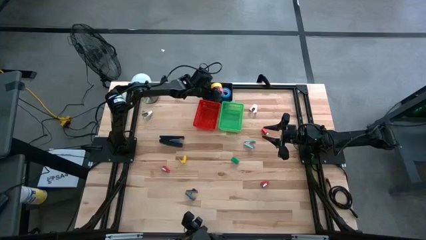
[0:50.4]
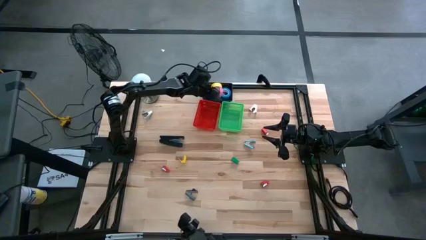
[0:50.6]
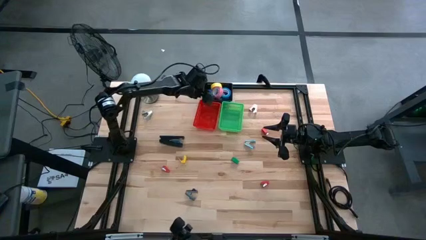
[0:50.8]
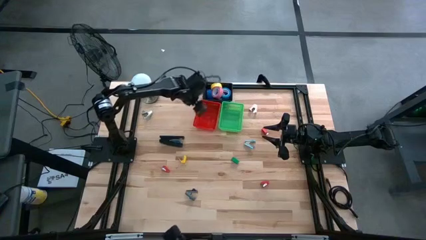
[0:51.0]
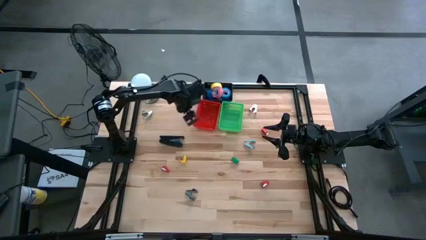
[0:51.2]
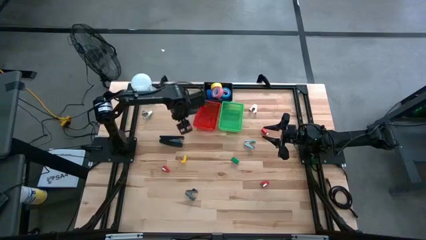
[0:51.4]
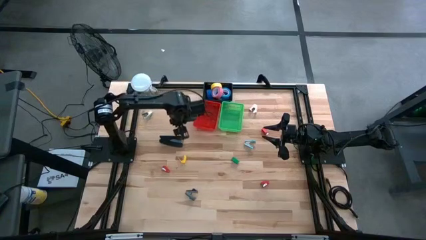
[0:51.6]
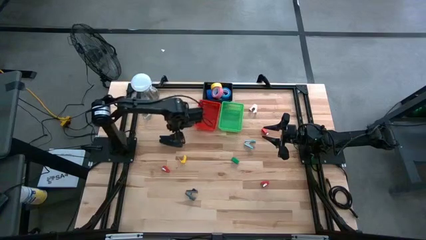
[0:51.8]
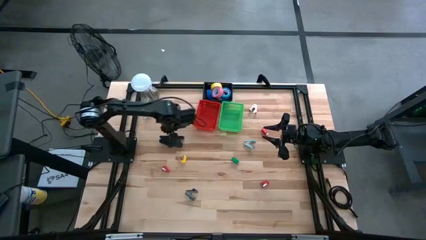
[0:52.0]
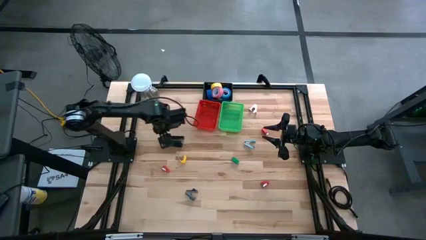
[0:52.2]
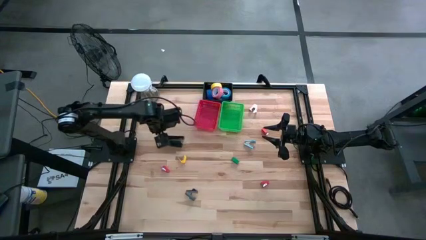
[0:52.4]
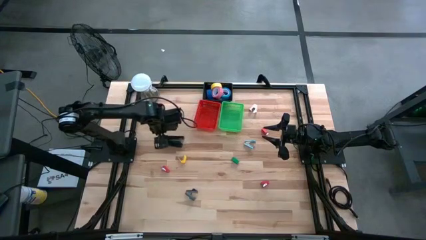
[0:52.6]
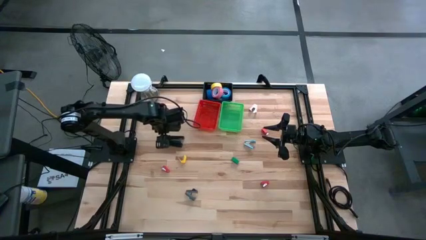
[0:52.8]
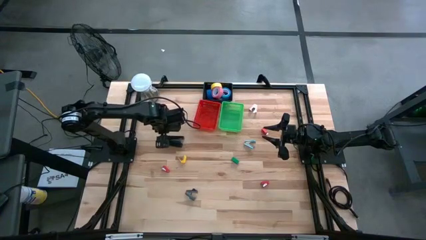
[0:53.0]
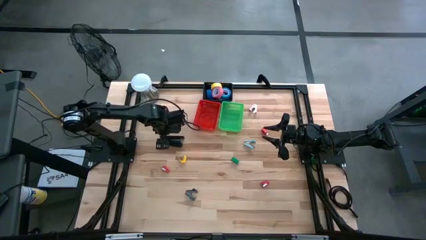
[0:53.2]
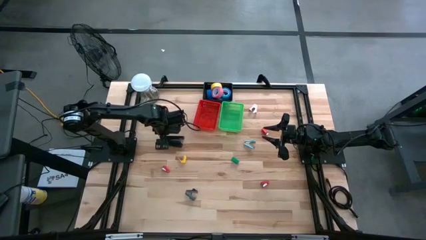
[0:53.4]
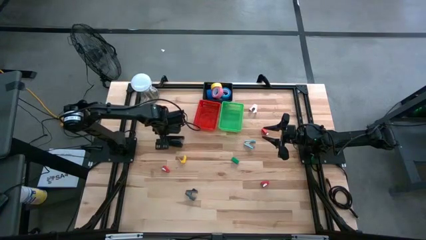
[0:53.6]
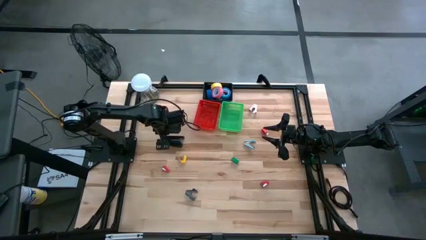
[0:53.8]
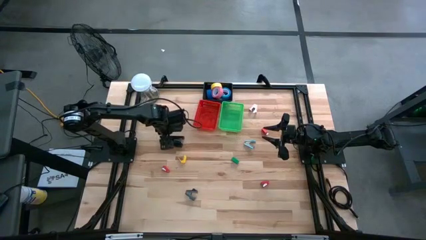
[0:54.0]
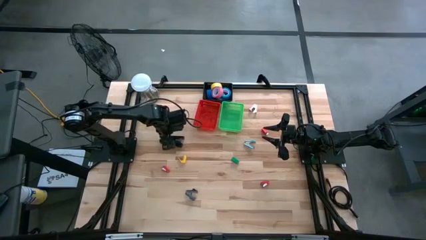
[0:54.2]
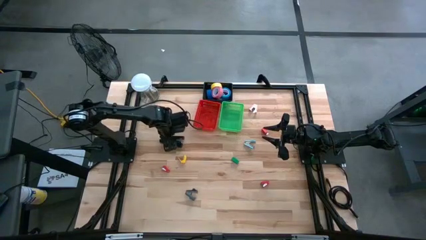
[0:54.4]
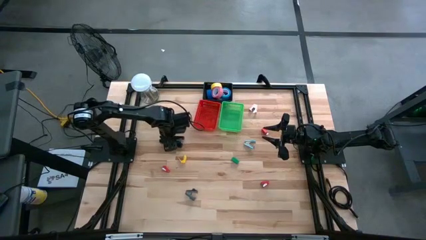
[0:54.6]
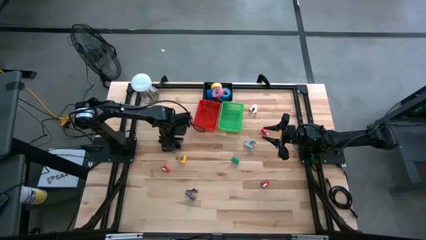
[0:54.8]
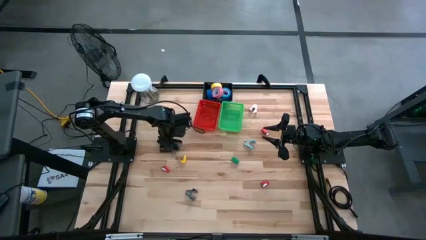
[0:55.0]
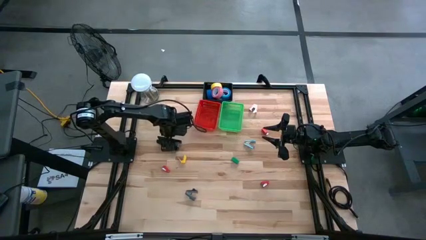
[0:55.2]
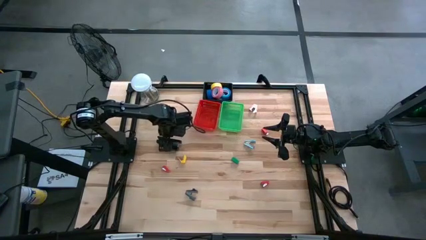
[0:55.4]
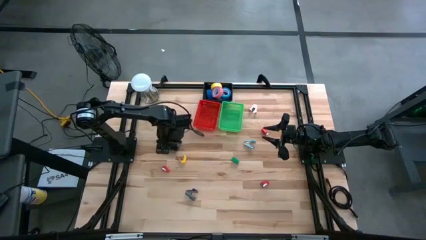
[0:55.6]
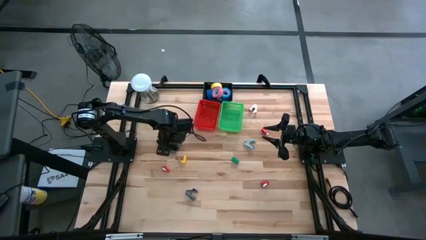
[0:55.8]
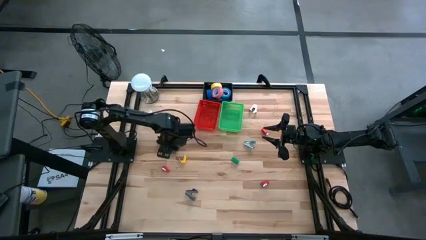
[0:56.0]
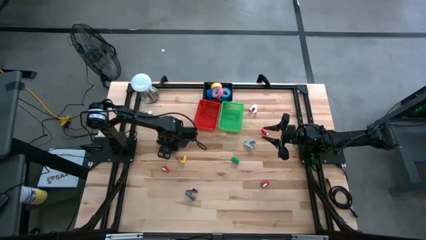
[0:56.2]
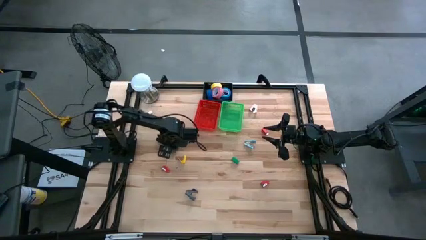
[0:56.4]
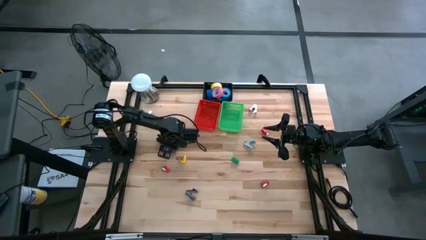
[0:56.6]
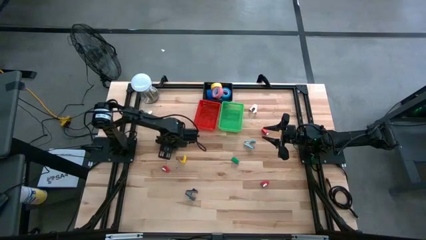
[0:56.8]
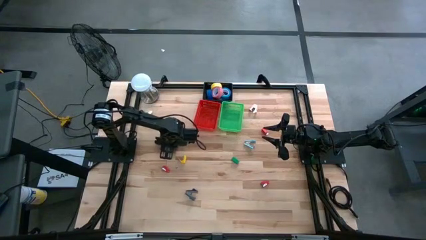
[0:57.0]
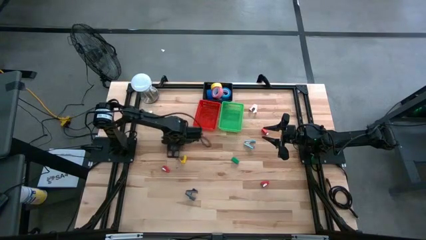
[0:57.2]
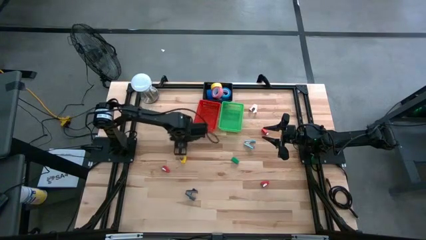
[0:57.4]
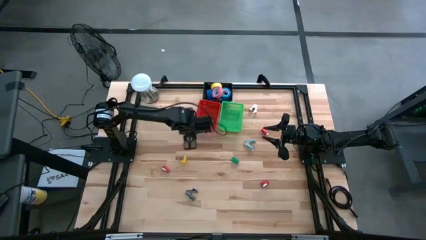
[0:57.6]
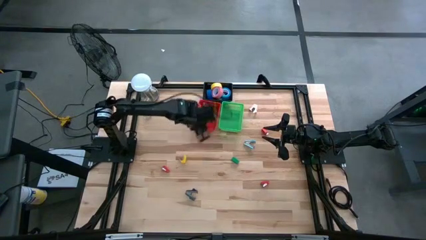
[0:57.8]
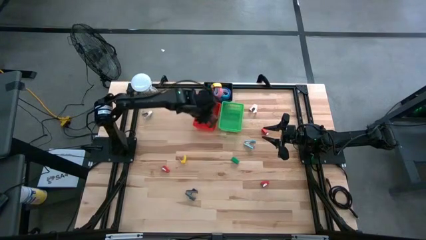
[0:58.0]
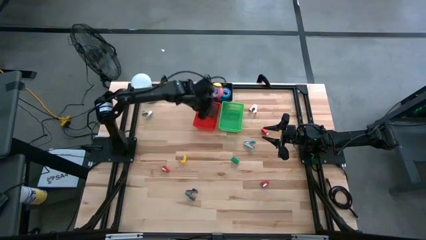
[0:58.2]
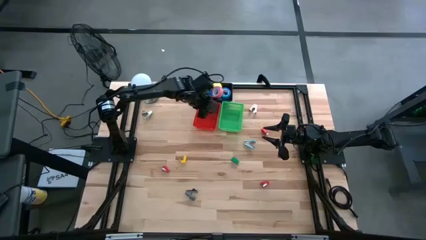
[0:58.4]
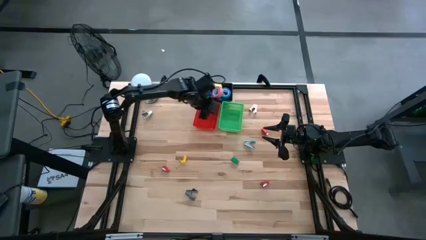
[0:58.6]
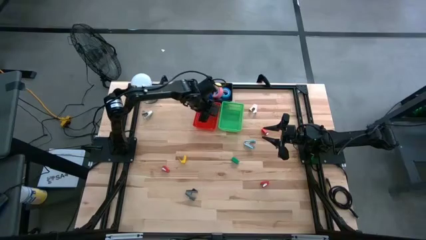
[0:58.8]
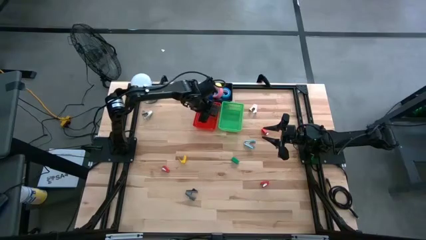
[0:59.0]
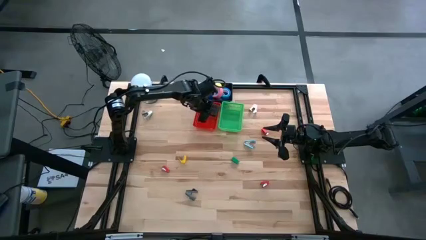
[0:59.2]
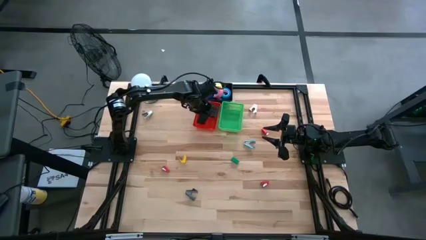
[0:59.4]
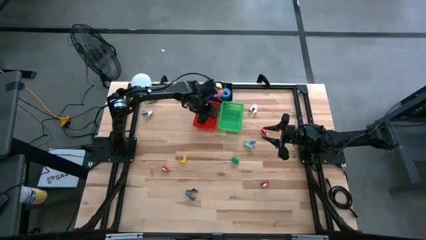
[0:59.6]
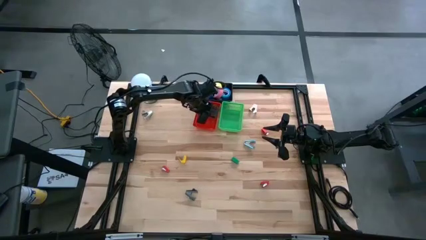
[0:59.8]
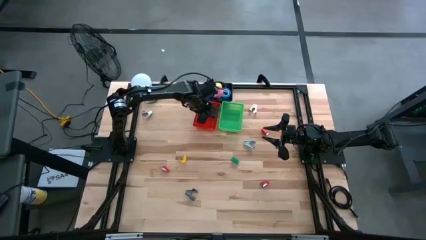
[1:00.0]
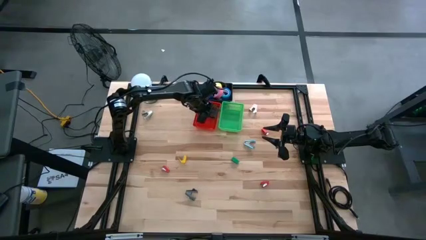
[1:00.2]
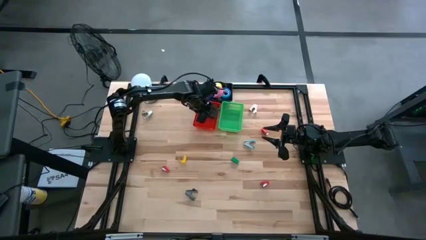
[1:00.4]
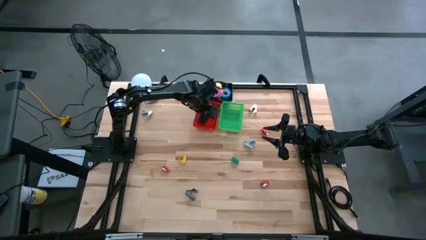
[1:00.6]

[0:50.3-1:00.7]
Task: Pick and place Stapler, Stapler remover, tape
Put the large black stapler into the red bin

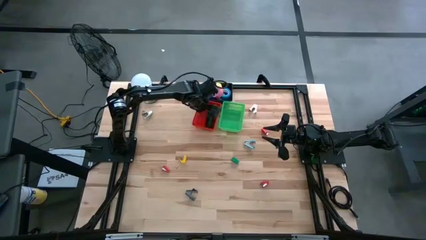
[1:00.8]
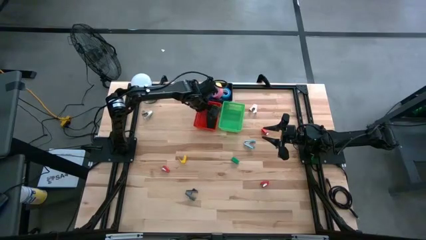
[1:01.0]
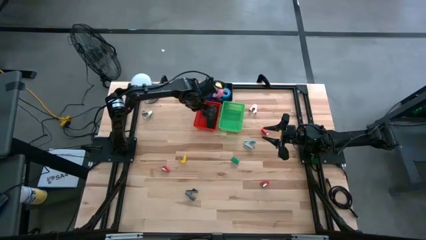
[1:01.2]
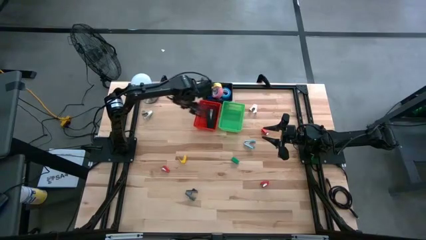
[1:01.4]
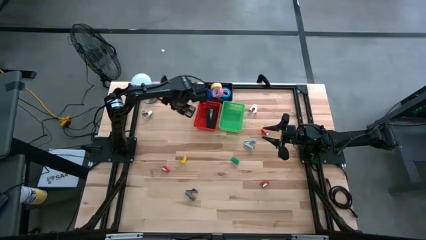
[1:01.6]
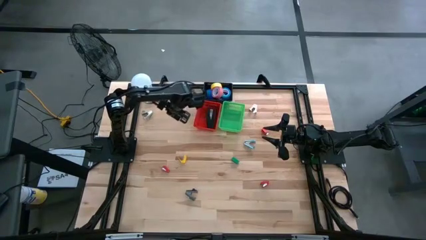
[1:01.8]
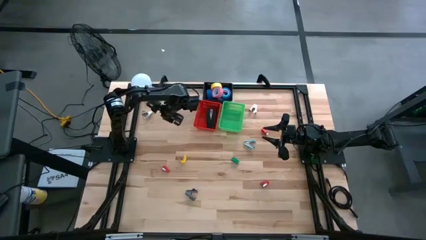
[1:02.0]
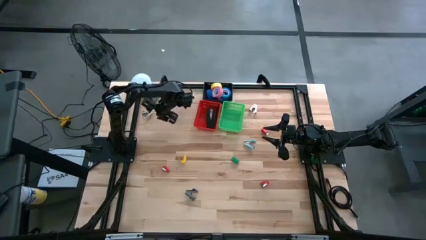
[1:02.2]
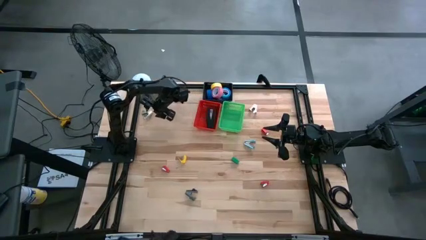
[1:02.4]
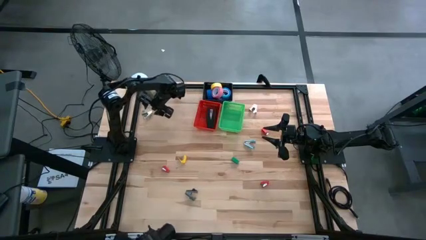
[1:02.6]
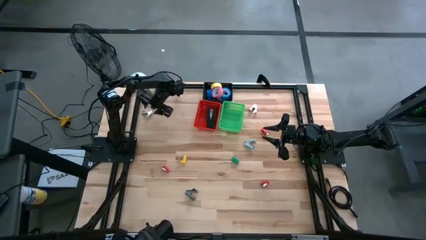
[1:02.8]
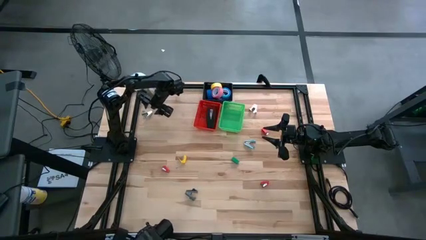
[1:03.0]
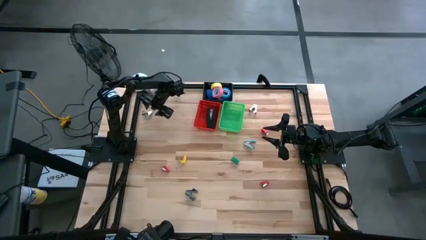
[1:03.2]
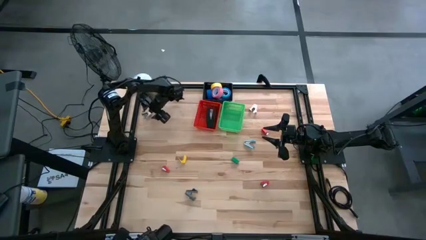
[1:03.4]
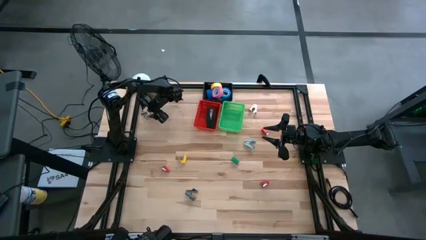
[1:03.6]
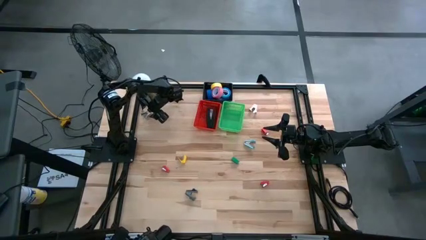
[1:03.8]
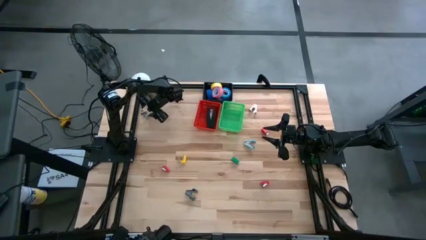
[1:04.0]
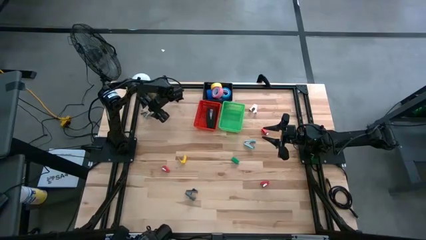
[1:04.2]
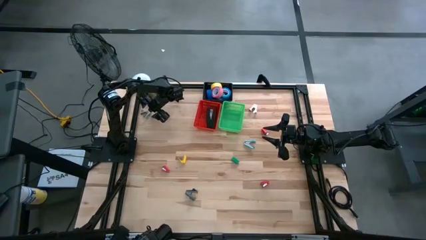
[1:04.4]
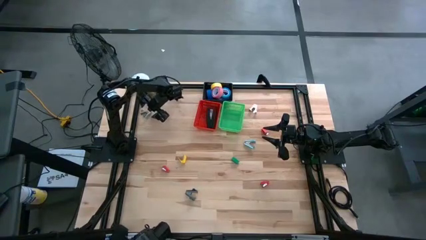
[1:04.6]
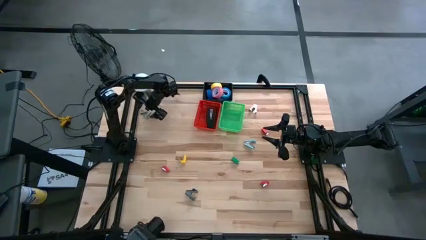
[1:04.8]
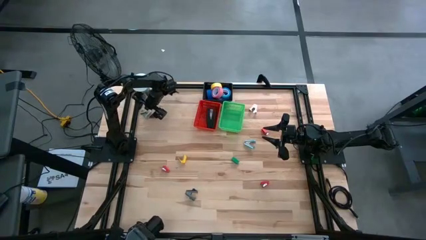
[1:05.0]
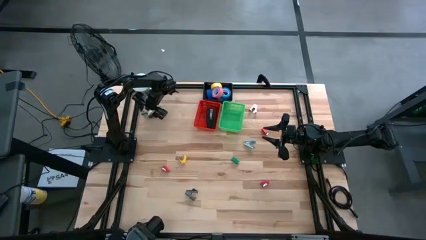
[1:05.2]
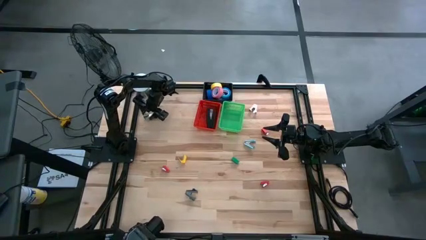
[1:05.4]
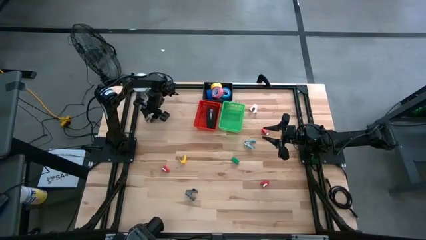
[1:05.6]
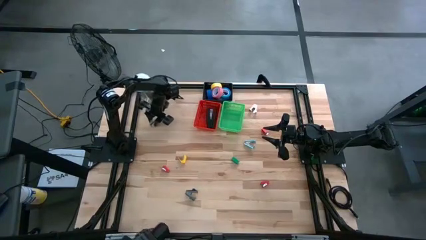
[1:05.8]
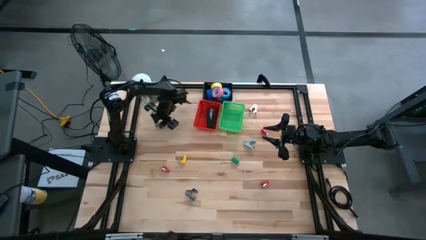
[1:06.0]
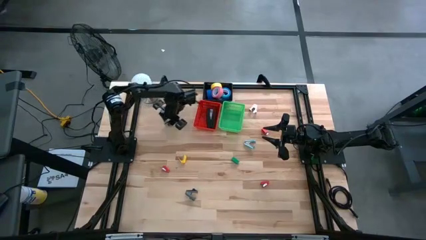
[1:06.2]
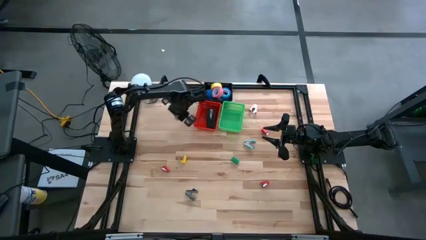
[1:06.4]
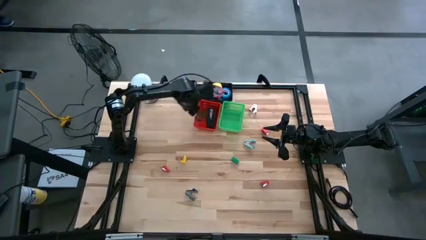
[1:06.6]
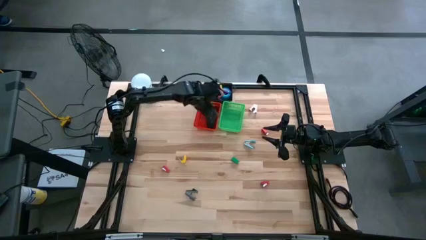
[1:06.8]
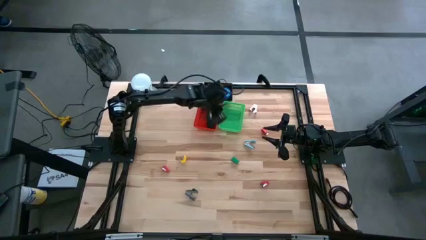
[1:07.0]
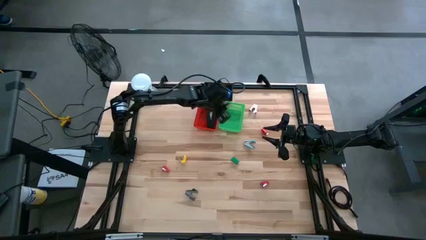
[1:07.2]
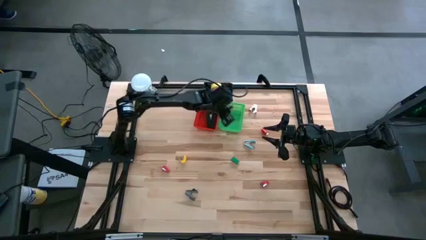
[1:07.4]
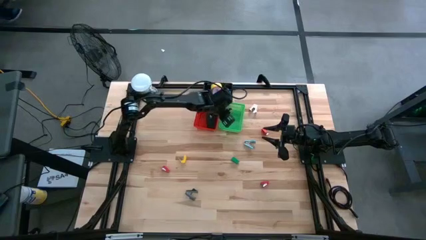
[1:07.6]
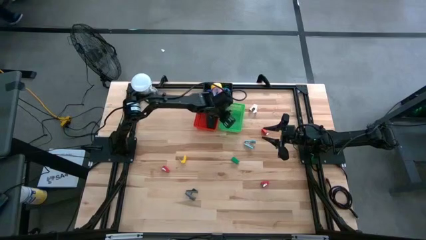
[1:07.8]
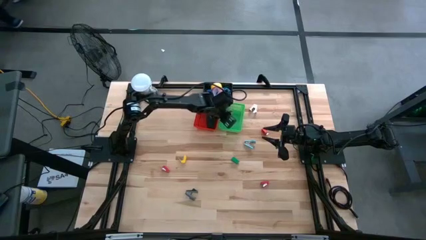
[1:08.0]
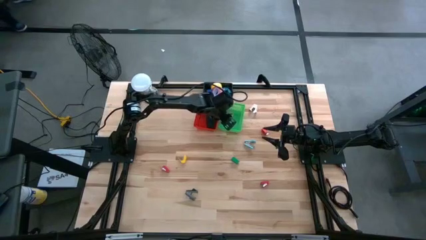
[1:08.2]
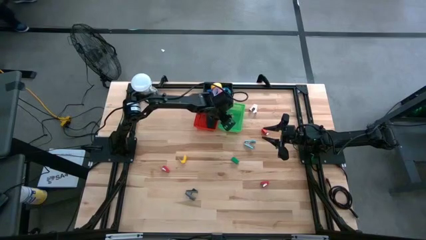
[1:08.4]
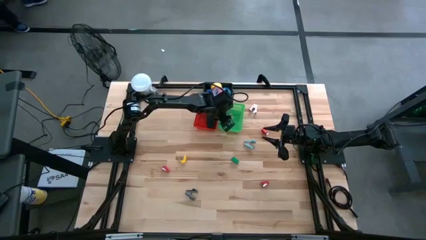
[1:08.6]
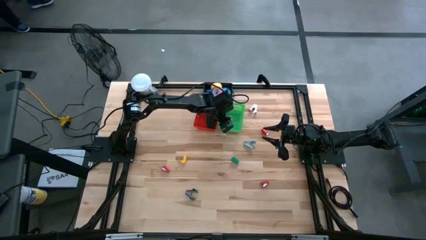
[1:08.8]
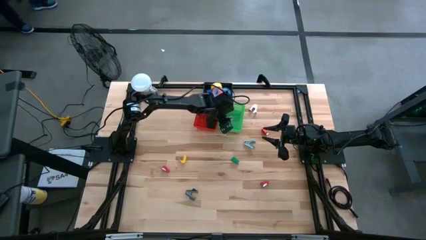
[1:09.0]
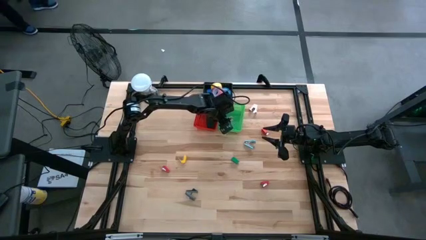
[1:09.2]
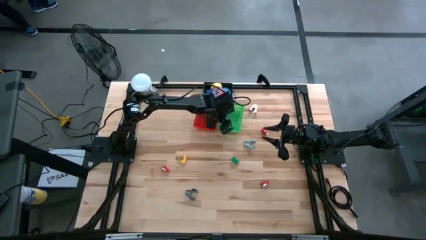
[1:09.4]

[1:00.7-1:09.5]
Put the gray staple remover into the green bin
